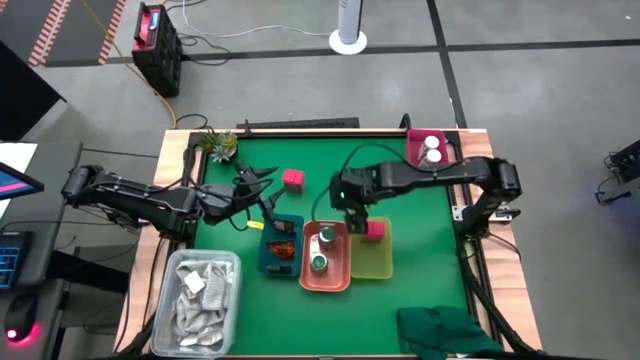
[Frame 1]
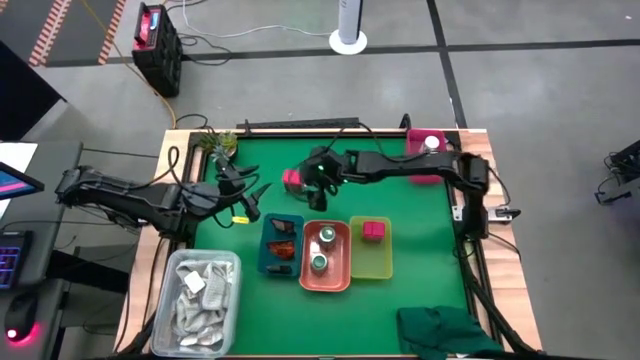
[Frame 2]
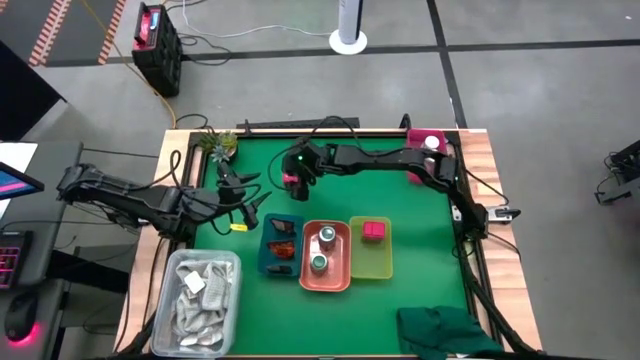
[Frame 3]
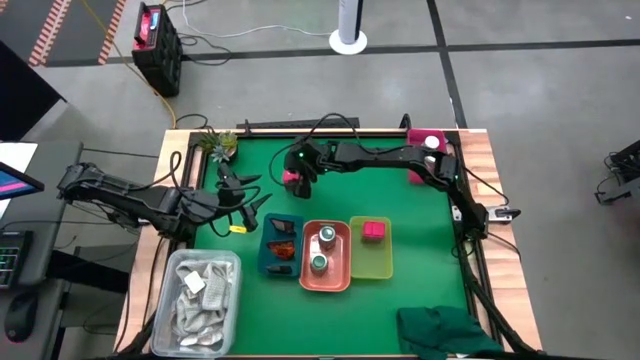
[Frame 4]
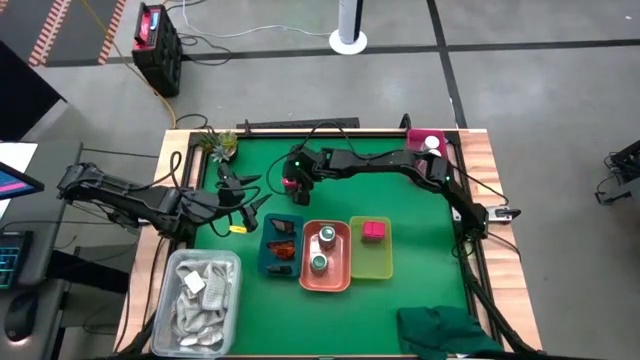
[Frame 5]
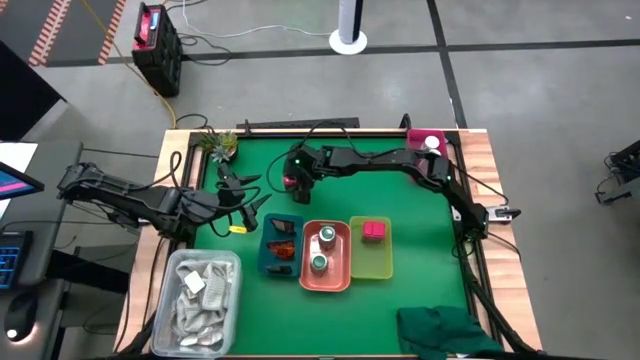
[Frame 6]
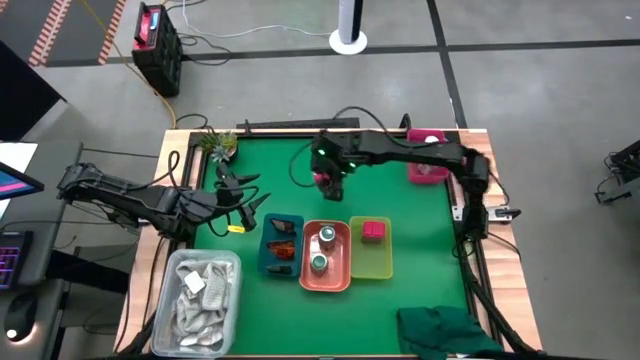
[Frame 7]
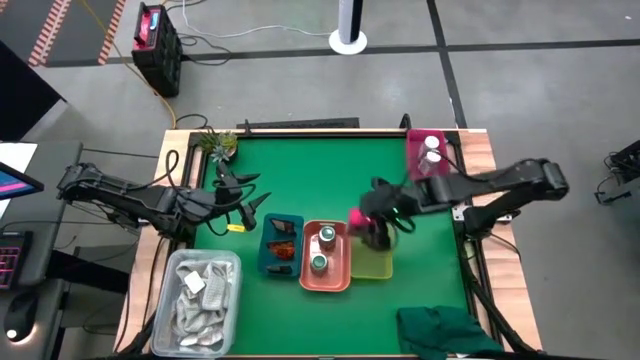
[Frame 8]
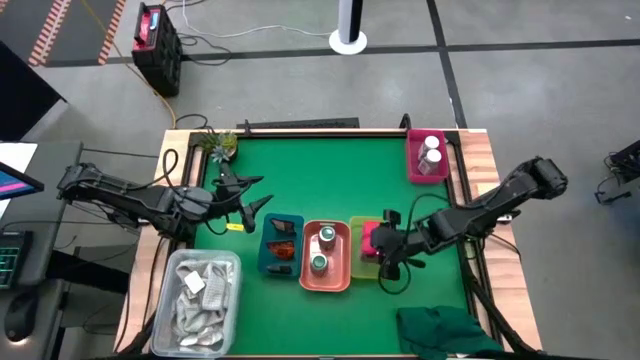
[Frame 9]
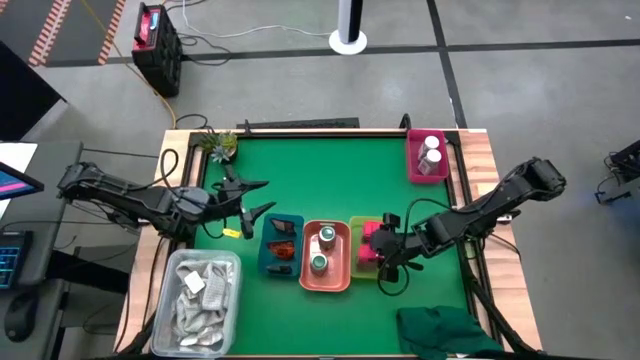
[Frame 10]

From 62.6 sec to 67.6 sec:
Task: Sort spices by type
Put the red seasoning can into the yellow bin

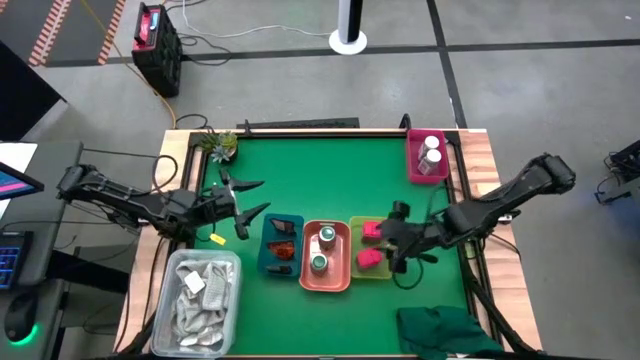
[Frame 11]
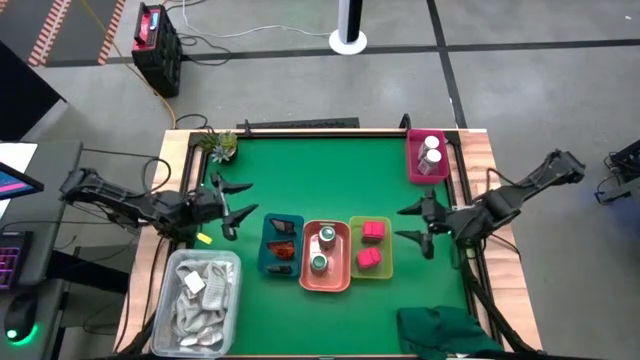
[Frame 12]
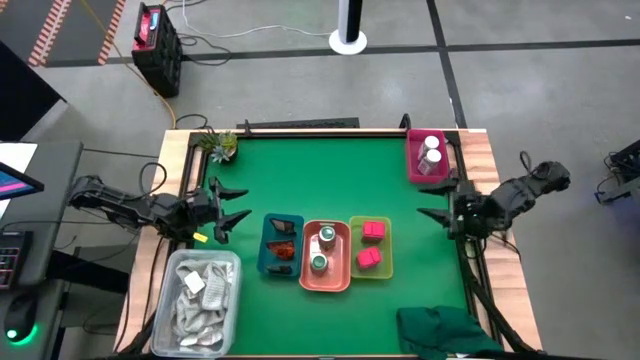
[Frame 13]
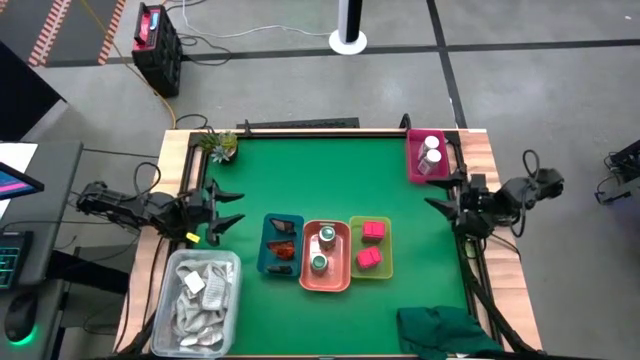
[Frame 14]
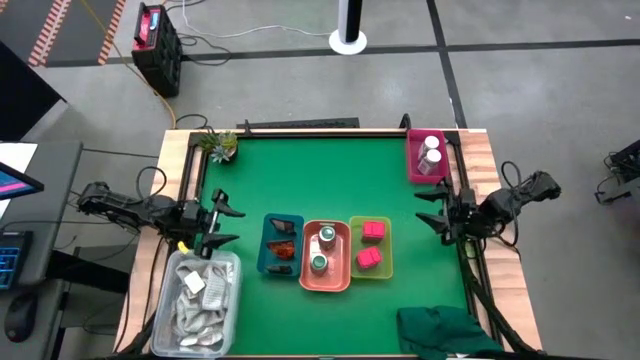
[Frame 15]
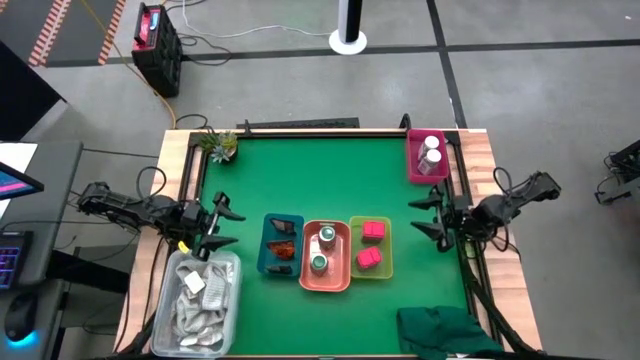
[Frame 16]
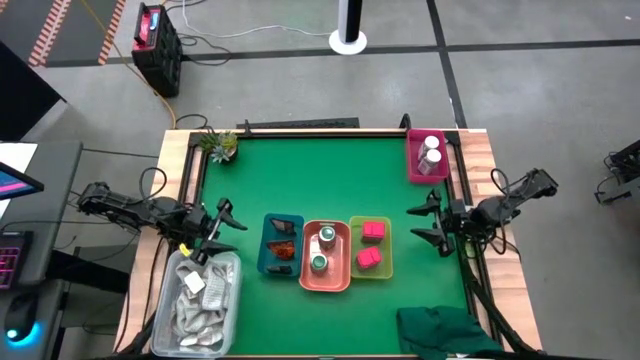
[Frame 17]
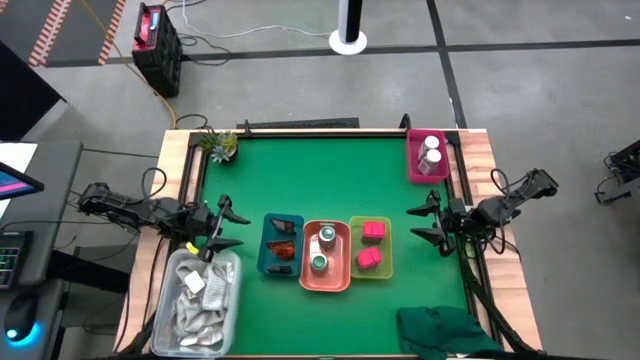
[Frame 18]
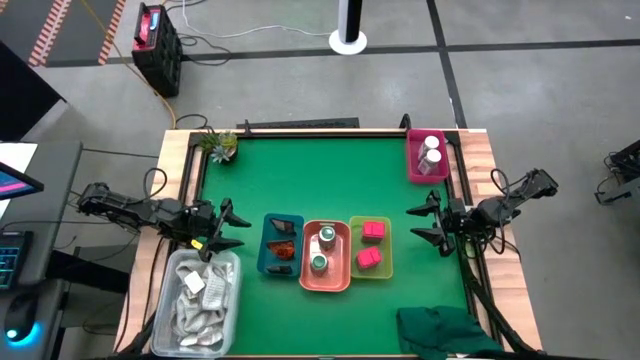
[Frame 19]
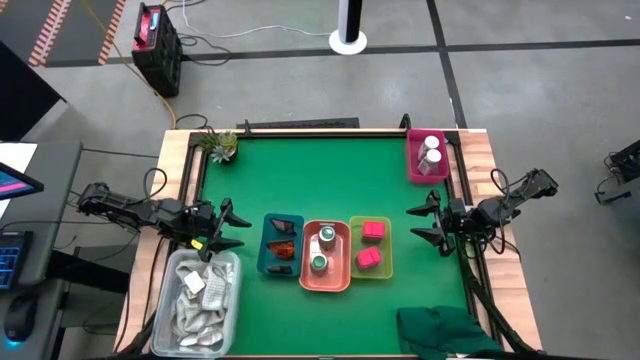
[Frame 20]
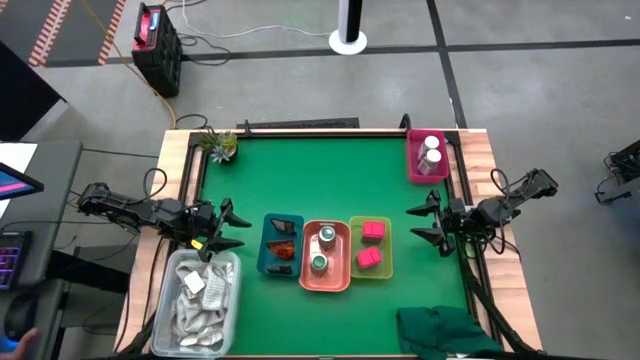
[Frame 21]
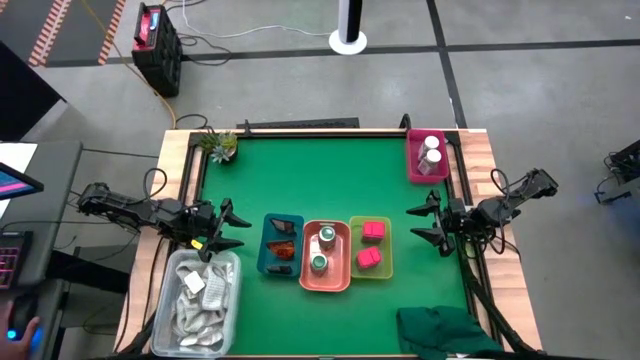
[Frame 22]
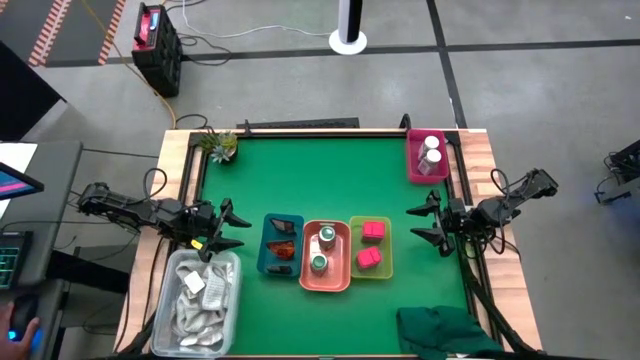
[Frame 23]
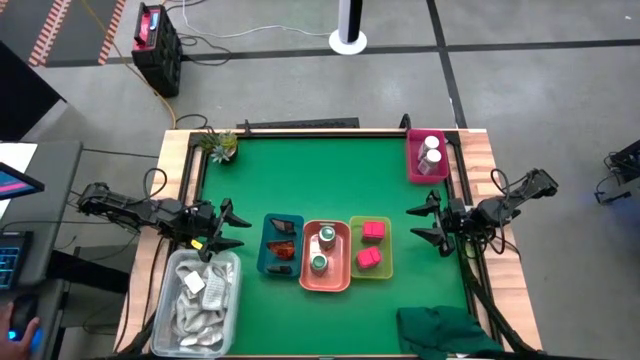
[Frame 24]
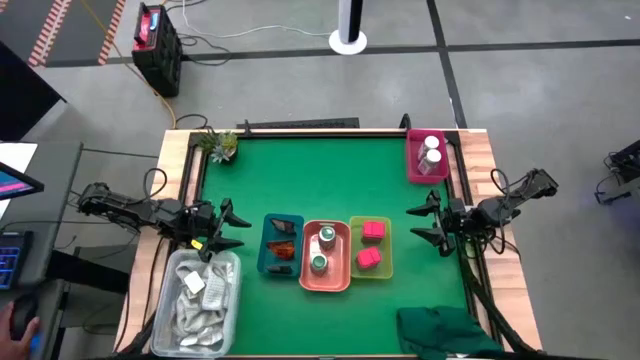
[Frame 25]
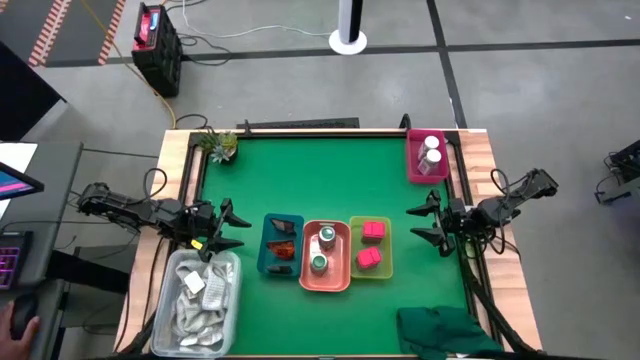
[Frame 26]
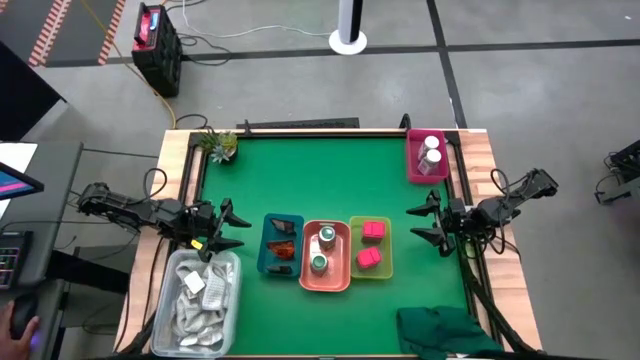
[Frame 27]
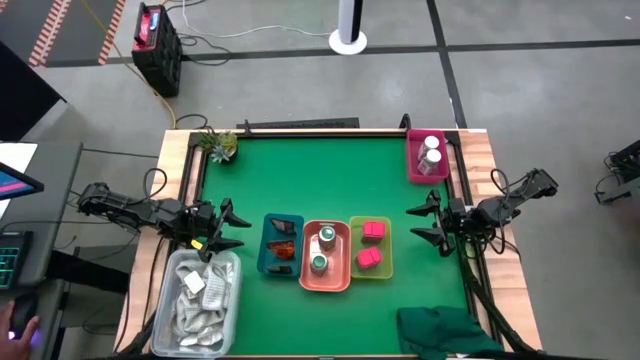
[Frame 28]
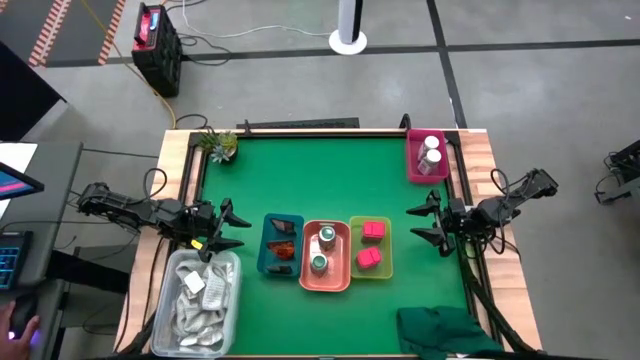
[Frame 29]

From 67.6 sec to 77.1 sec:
Return to Home Position

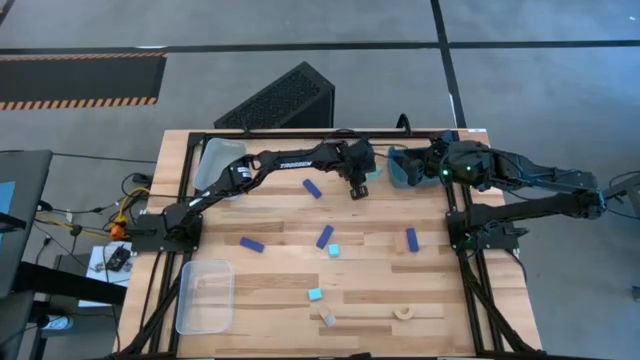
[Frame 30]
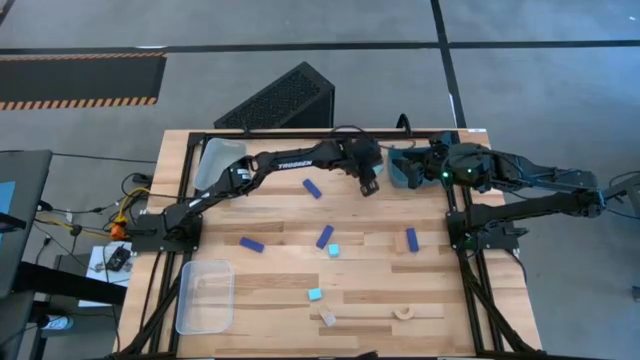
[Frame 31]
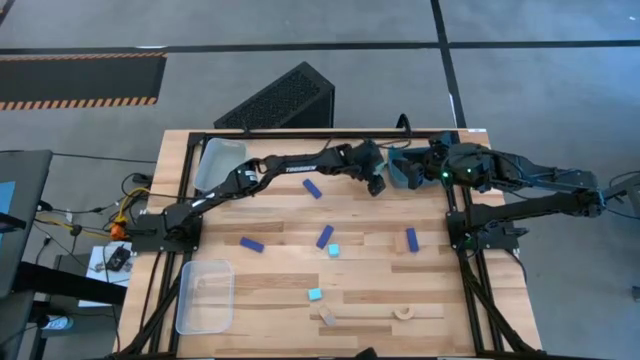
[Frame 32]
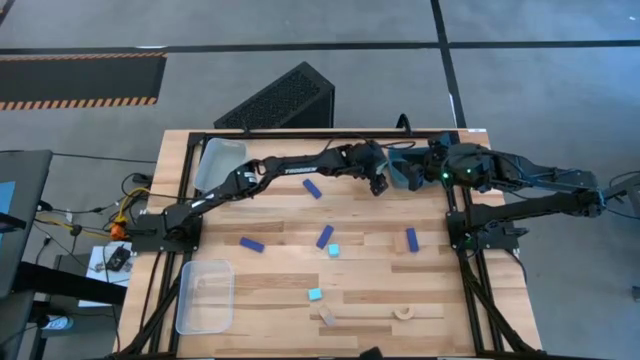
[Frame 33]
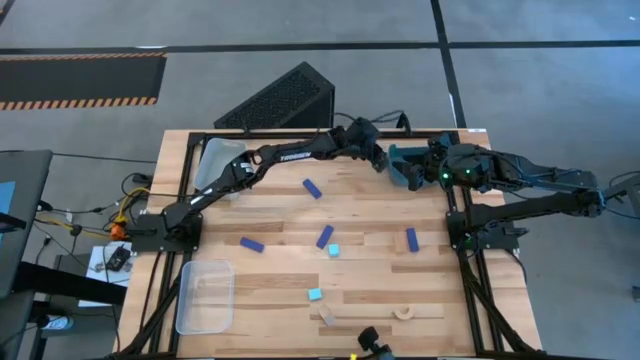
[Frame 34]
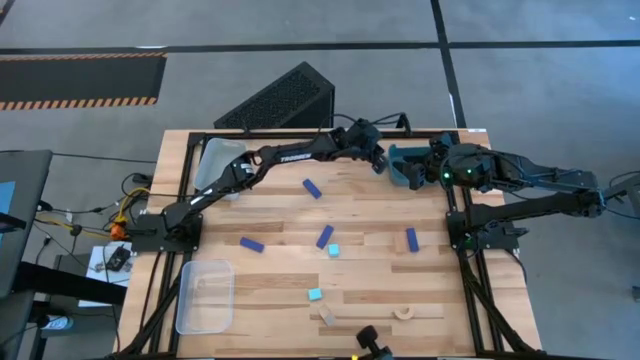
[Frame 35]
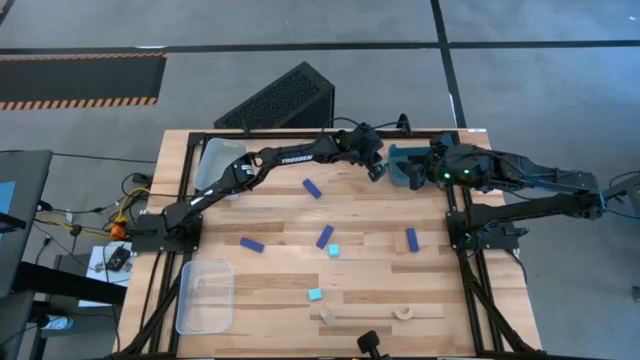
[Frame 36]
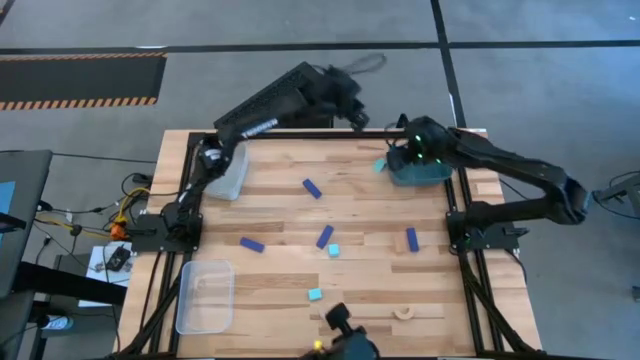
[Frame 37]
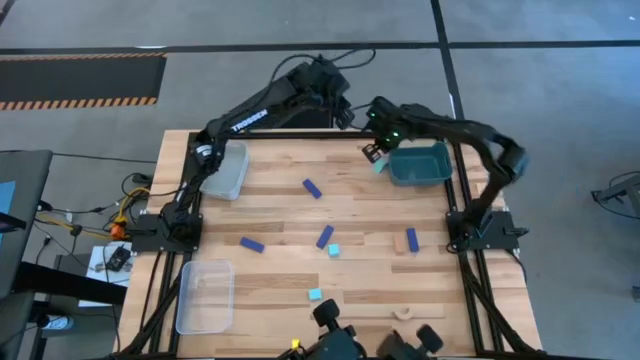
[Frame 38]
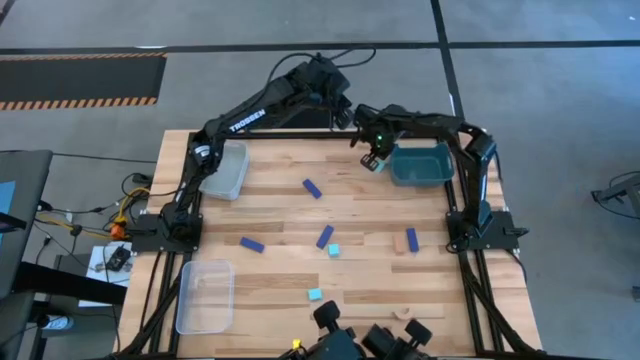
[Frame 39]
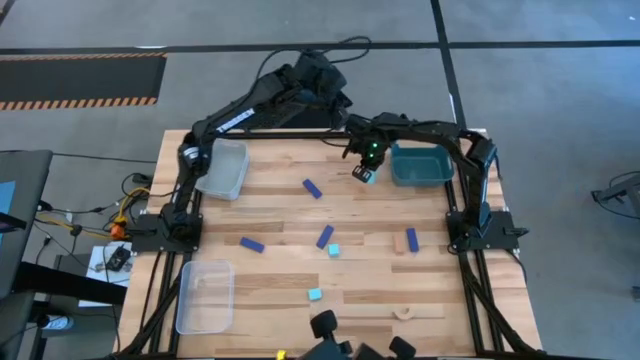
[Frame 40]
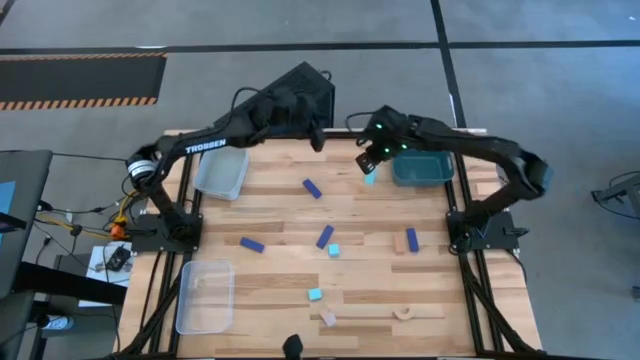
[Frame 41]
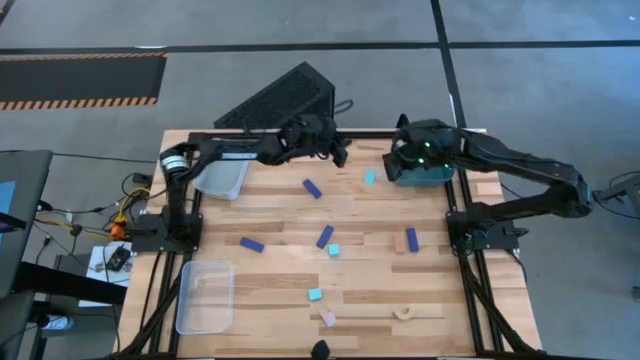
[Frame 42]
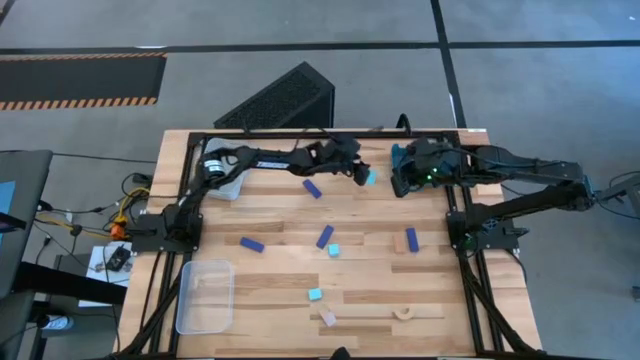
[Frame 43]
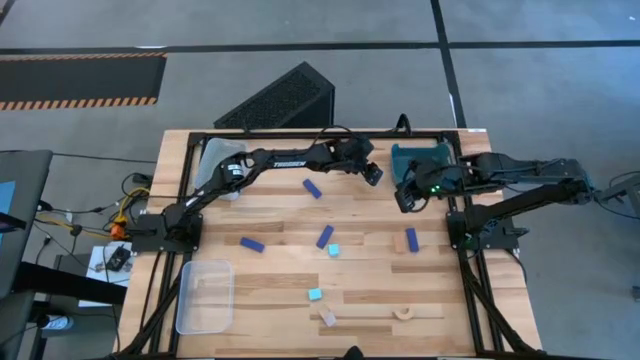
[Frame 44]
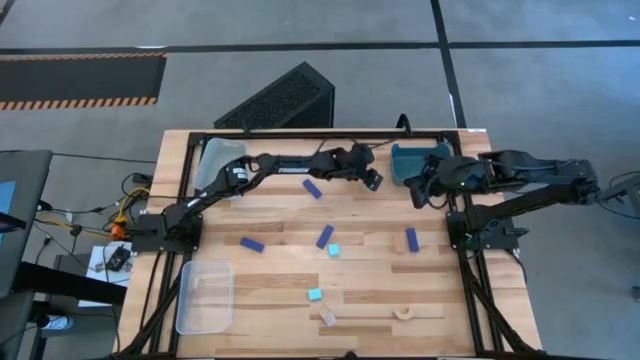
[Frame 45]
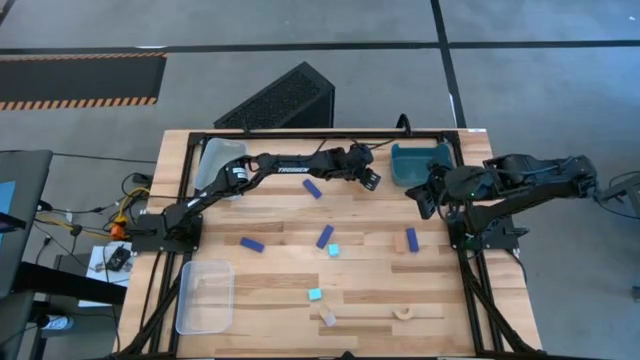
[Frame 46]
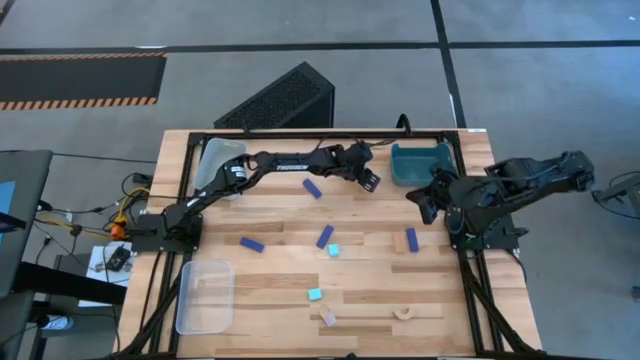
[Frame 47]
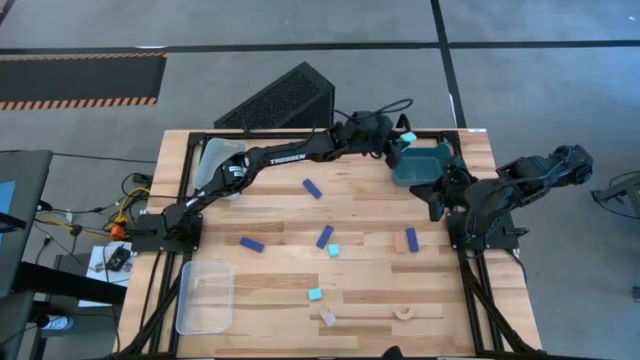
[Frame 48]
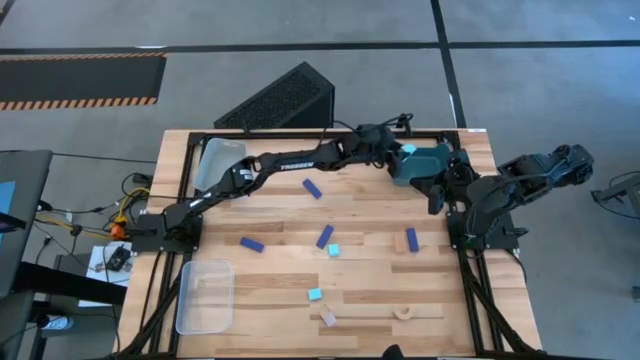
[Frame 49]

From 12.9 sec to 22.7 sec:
Task: Sort & place blocks by color
Put the light blue block into the dark green bin
